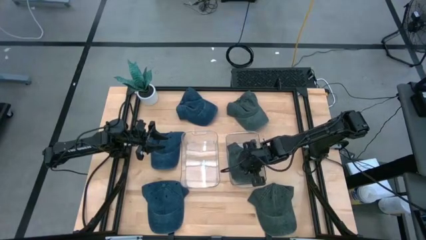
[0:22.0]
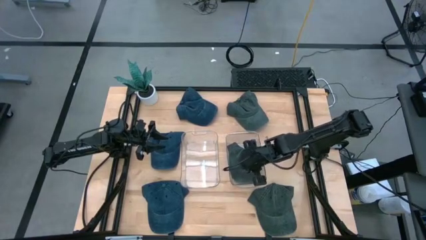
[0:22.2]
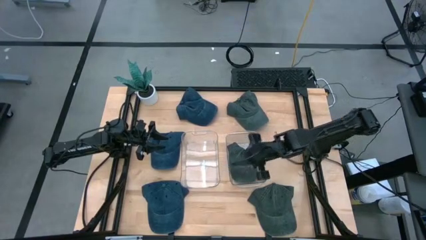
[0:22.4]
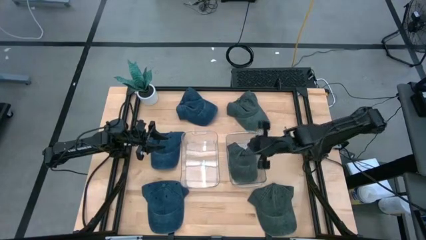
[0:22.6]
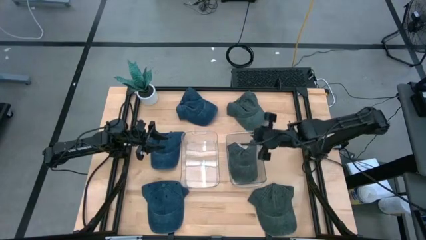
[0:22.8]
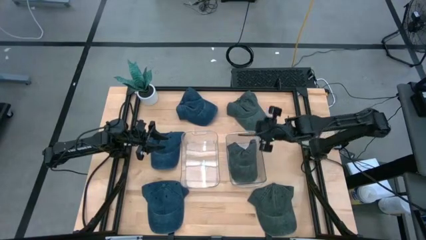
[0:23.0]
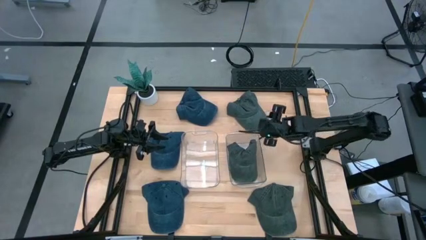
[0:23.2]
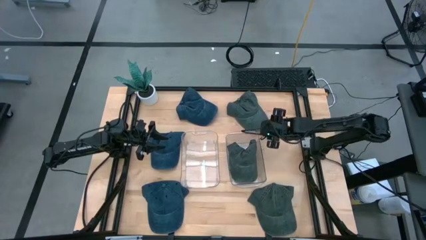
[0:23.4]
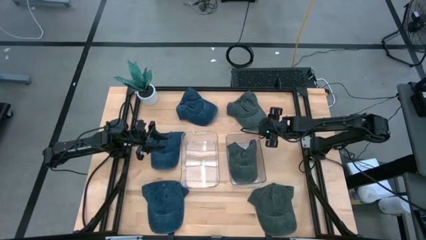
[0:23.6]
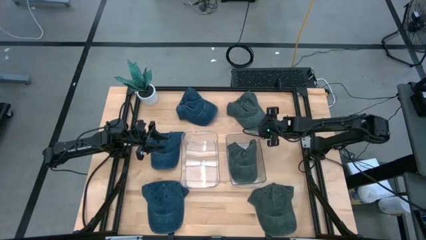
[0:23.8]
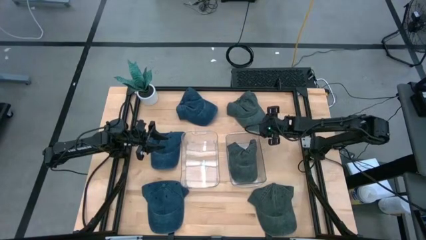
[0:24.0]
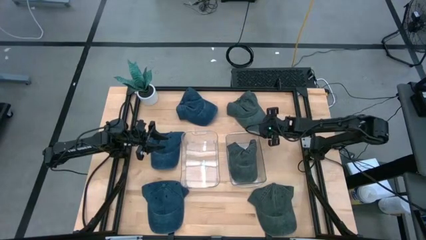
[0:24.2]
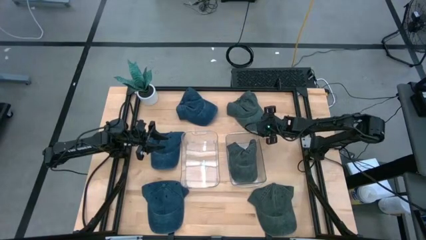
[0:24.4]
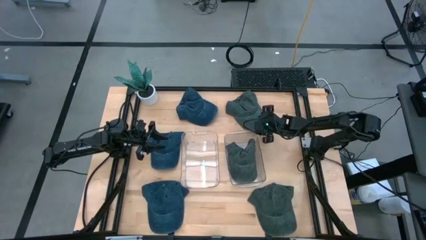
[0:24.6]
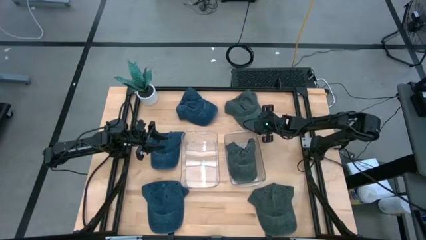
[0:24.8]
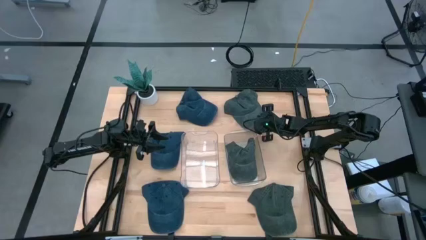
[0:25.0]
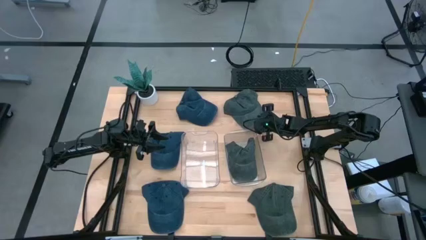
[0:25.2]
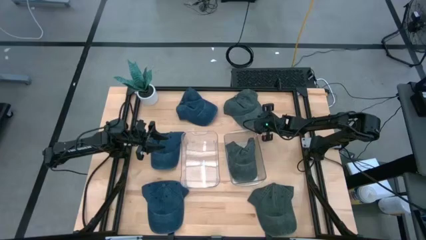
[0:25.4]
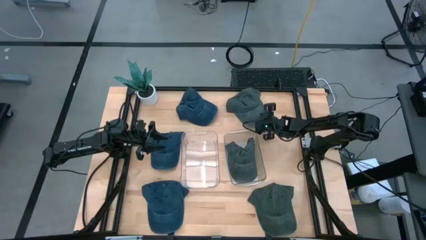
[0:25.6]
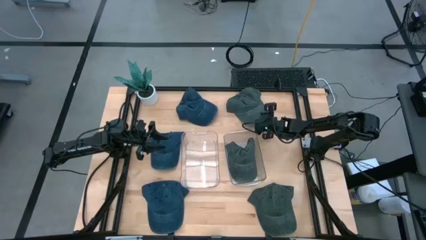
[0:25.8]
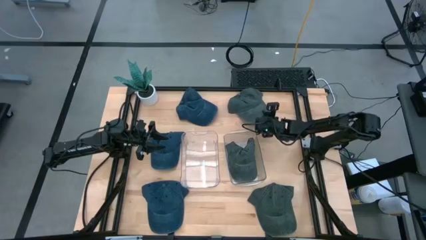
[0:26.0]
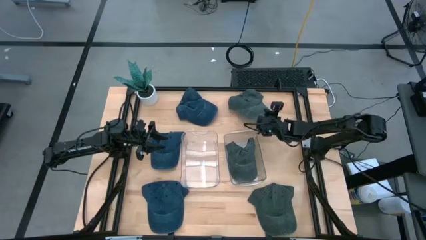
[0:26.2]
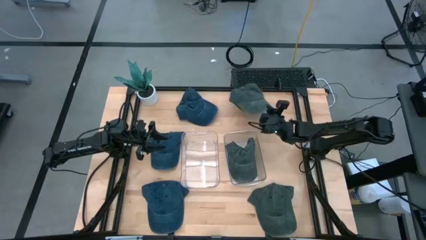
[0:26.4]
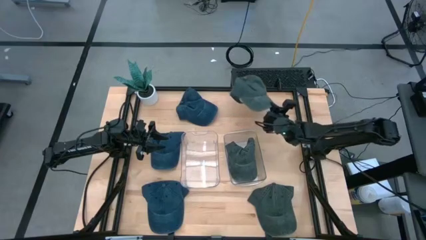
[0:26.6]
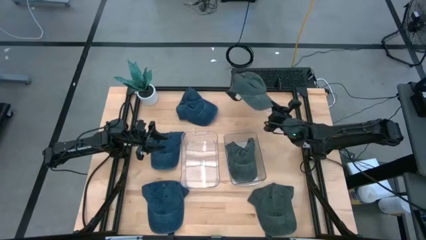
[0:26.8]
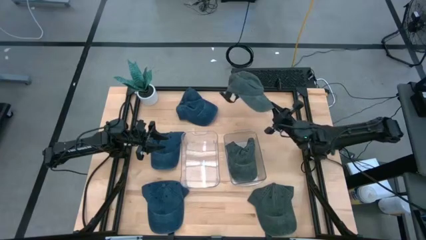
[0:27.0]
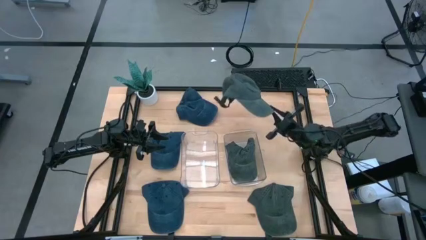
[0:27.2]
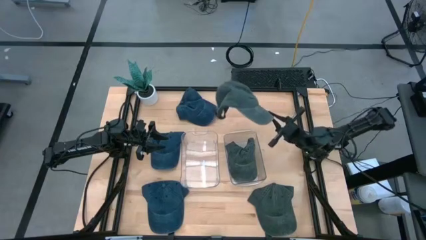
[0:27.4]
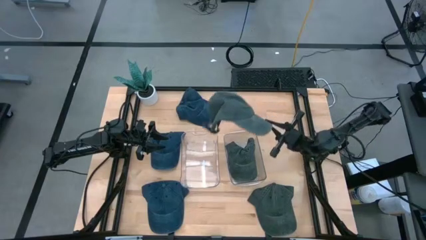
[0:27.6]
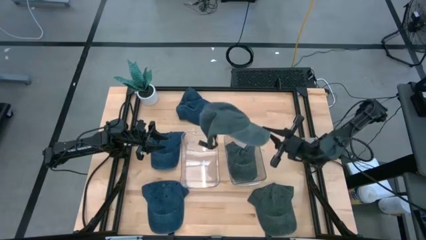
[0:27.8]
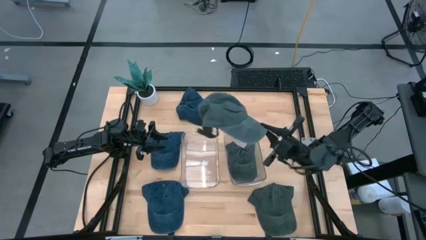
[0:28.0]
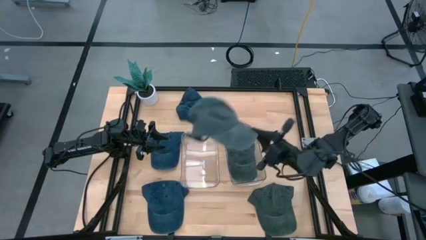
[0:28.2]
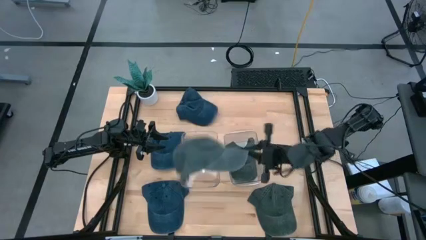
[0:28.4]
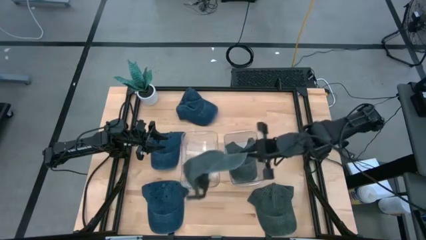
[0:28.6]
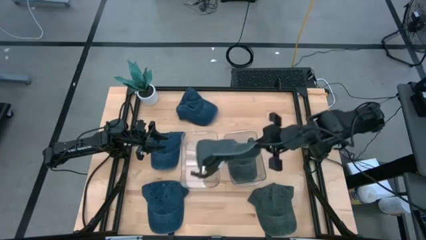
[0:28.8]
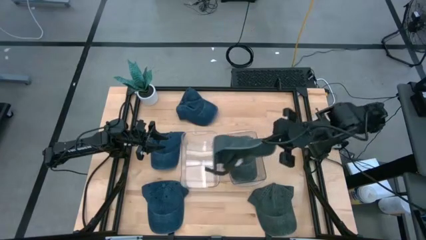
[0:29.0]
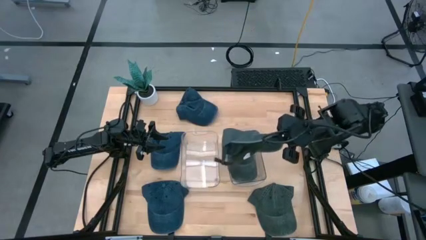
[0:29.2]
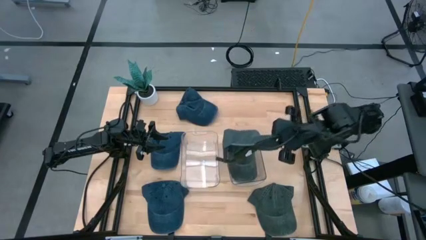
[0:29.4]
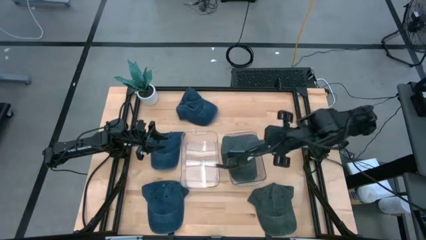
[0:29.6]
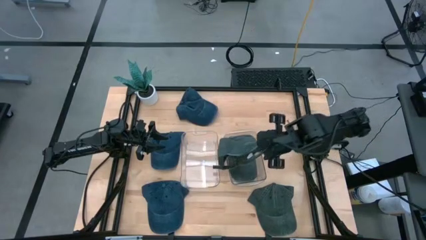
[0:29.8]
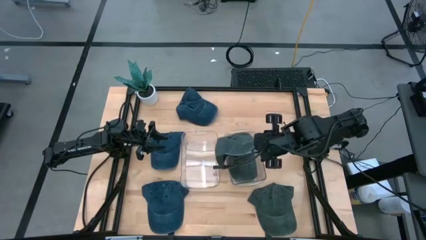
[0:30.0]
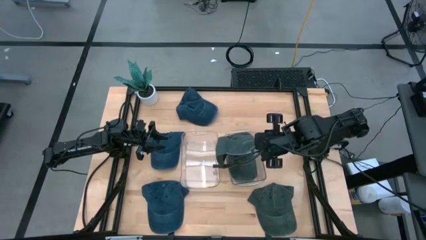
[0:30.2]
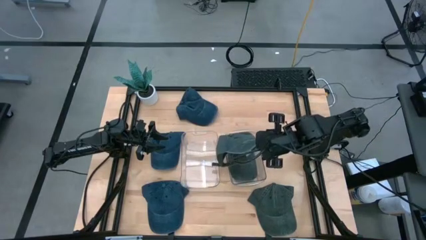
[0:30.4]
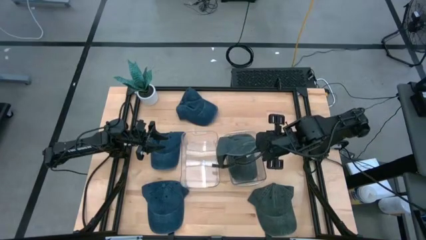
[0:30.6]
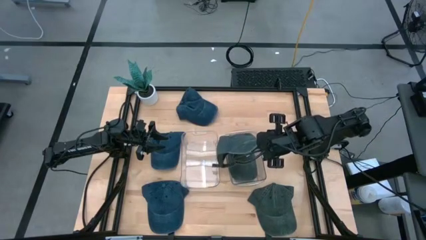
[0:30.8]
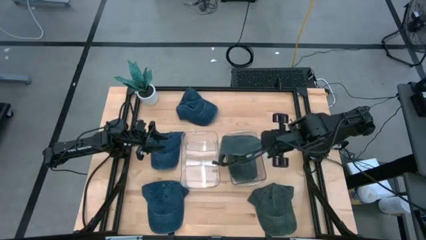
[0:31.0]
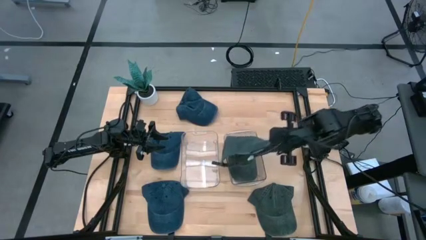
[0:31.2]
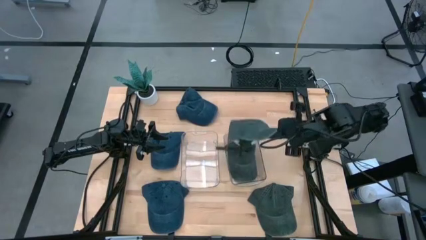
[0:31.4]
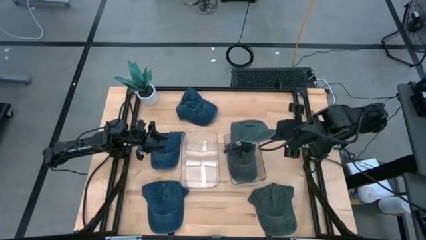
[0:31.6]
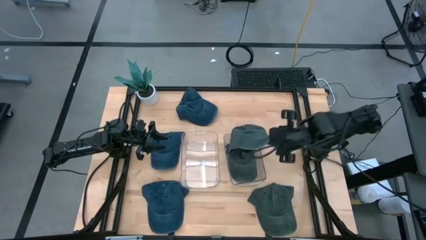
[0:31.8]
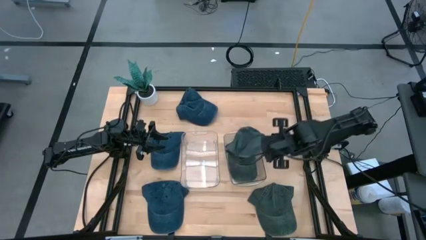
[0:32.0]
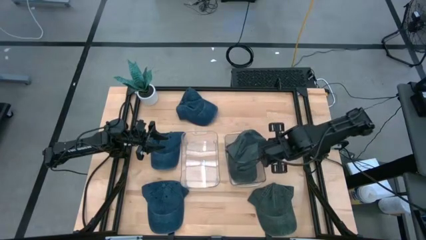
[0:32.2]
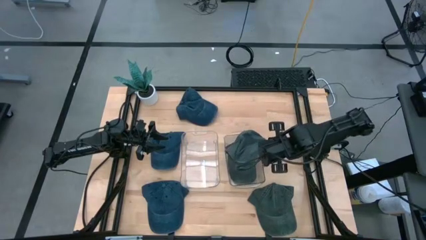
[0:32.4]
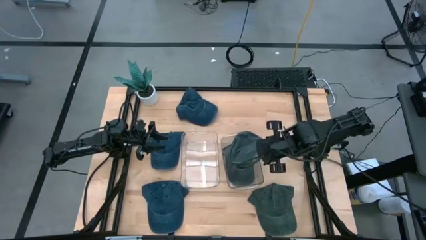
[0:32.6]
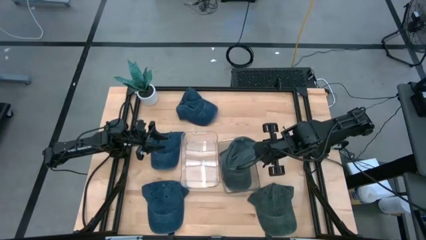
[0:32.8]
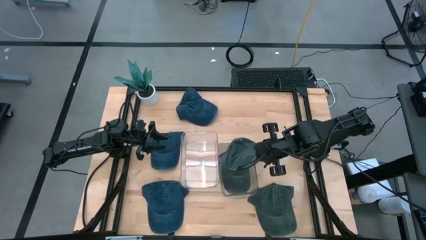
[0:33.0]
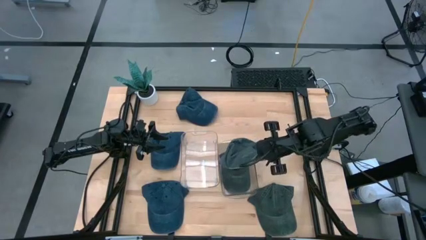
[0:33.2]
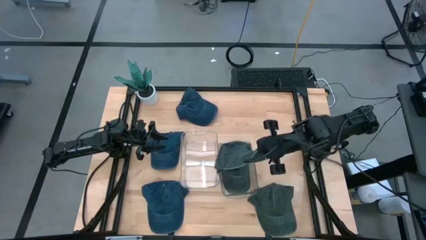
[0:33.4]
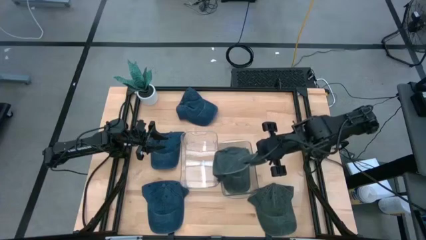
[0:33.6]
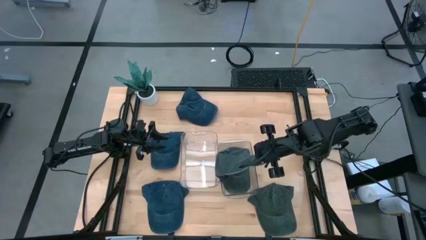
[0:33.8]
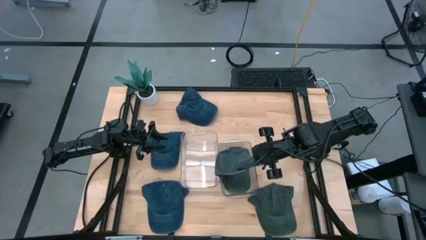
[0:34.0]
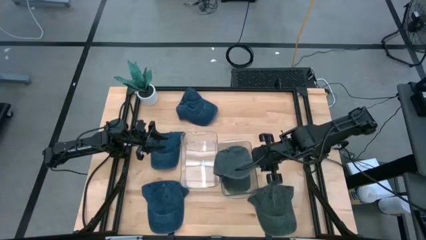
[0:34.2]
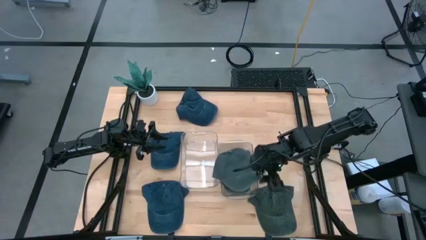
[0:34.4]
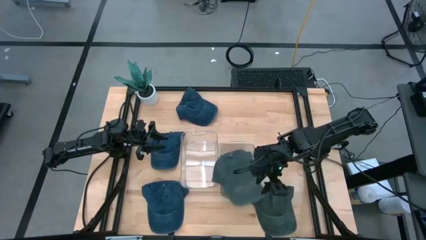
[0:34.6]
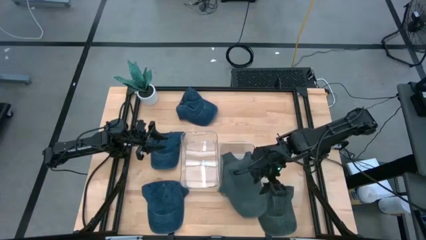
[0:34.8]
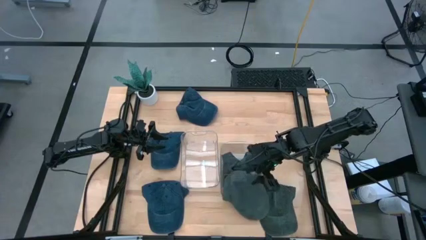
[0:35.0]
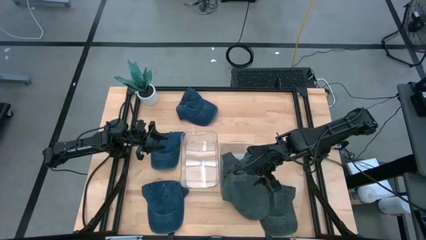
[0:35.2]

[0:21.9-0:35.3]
Task: Pick & Place hat
Put the top gray cap into the right transparent bin

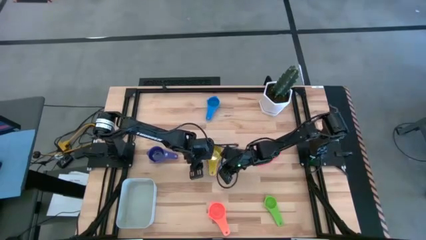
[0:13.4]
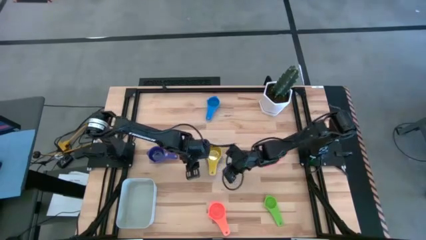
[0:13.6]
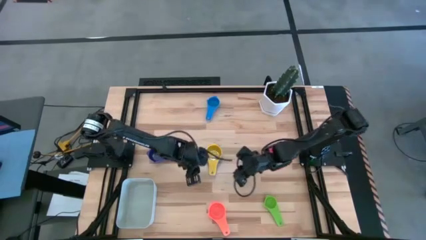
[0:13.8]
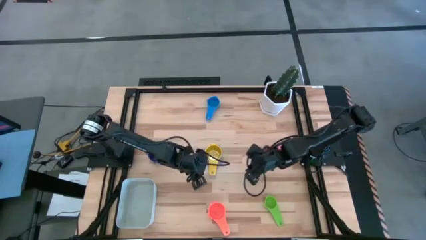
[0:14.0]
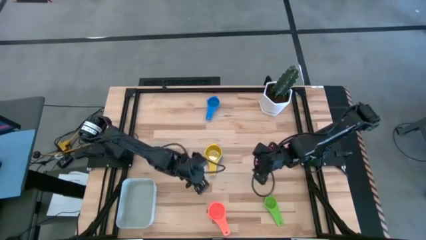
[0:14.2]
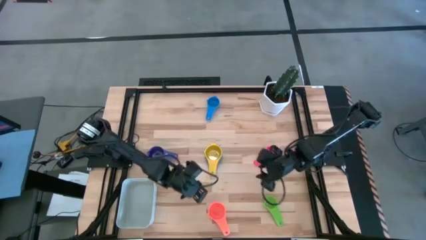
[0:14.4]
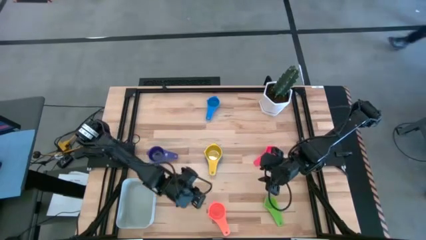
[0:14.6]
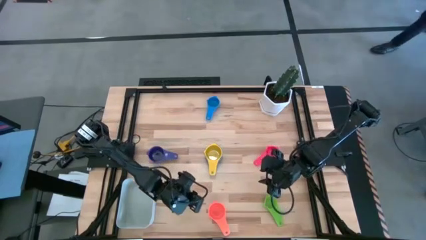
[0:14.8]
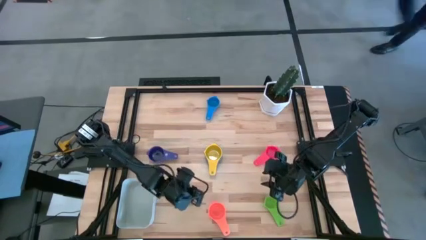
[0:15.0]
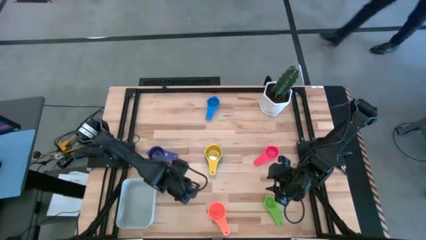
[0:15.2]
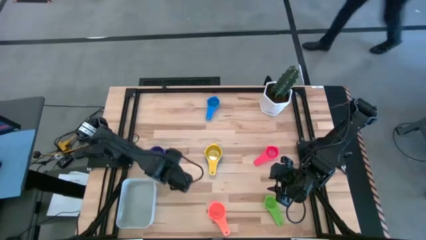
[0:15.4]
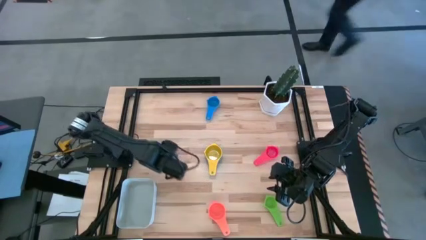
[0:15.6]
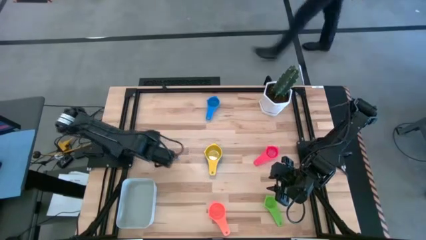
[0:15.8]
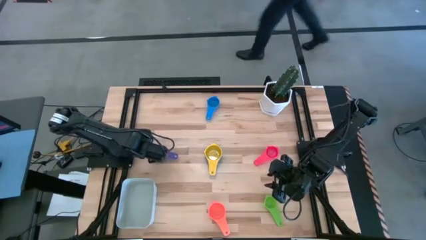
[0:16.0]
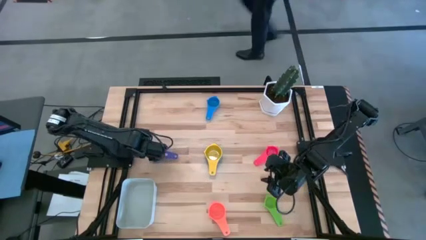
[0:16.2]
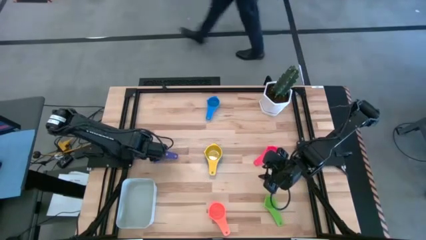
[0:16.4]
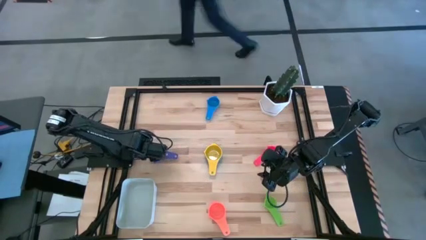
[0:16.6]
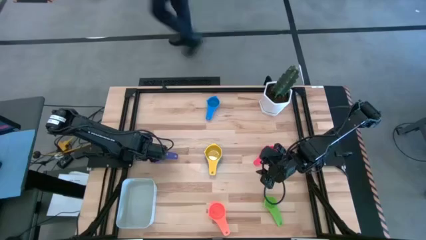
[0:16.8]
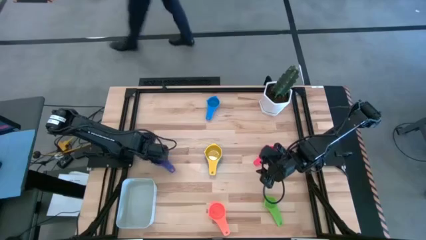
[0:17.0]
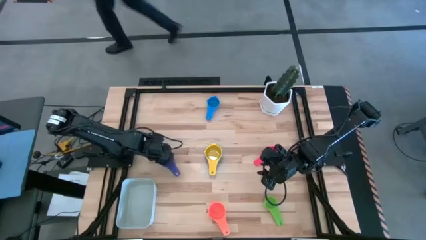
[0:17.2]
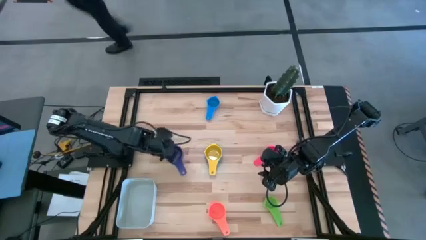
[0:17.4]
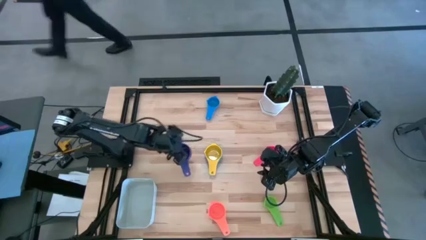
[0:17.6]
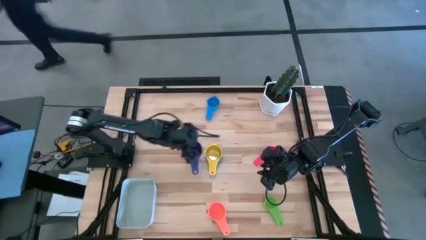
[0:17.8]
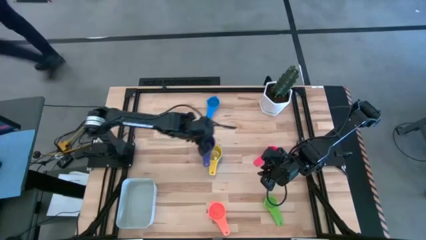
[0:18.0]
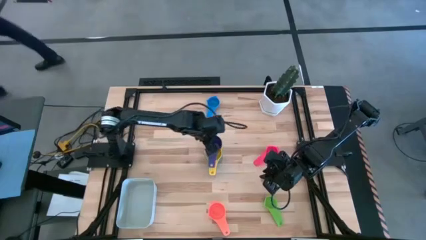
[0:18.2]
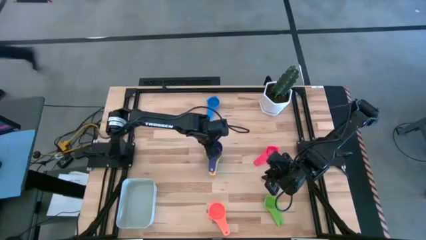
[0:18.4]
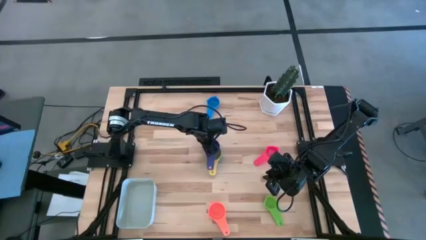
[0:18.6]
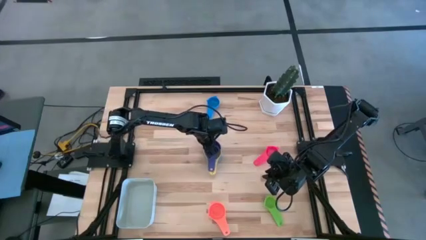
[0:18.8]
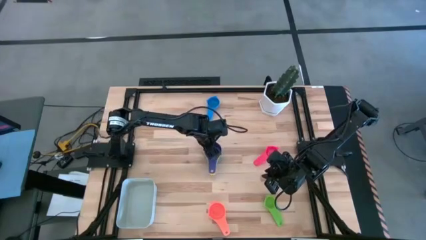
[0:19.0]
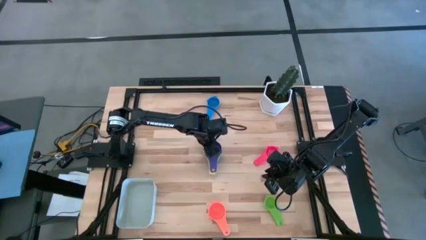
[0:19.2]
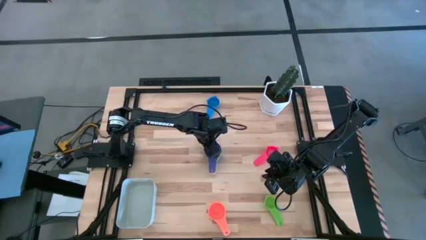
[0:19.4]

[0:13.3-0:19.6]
Task: Nest measuring cups in basket
Stack the dark blue measuring cup on top of the yellow measuring cup
